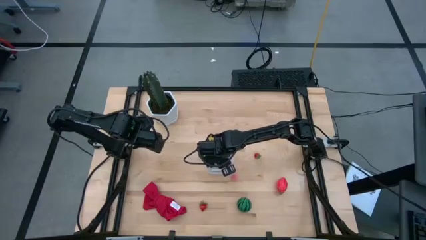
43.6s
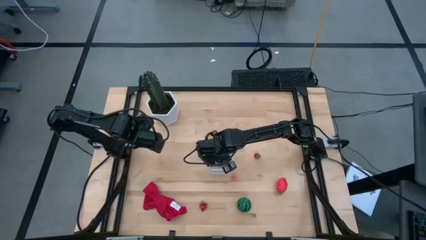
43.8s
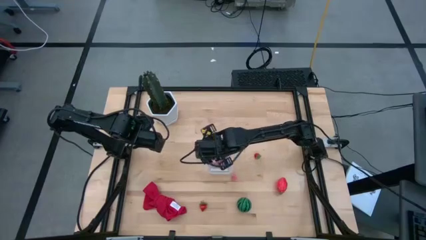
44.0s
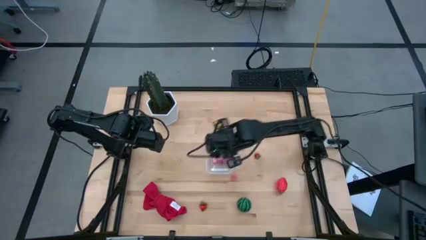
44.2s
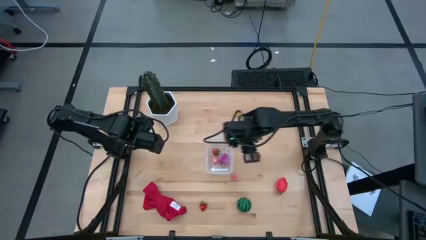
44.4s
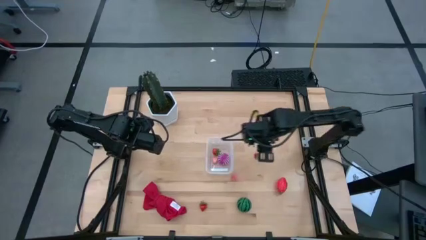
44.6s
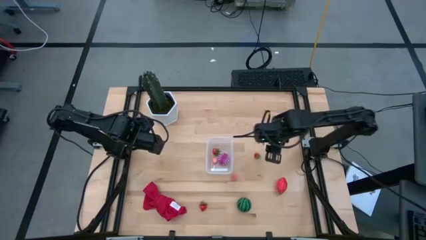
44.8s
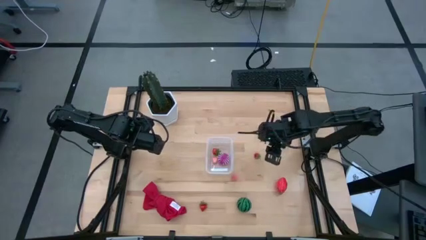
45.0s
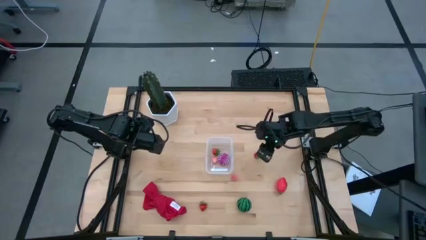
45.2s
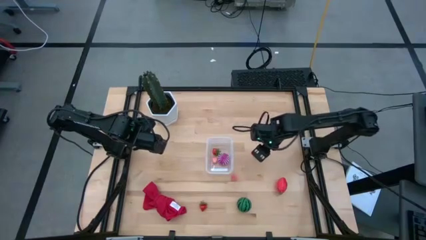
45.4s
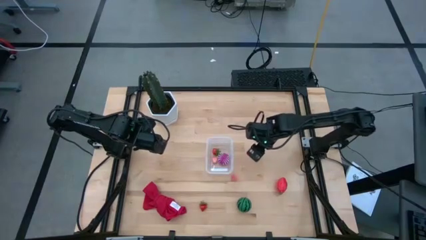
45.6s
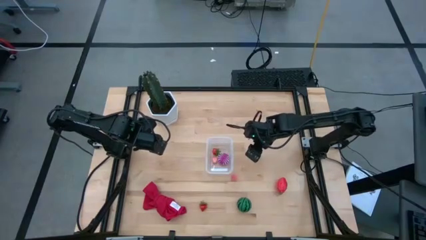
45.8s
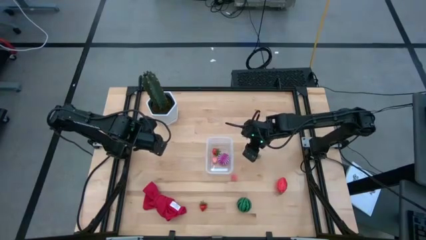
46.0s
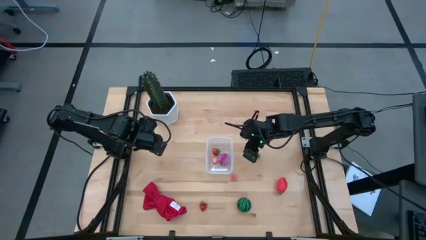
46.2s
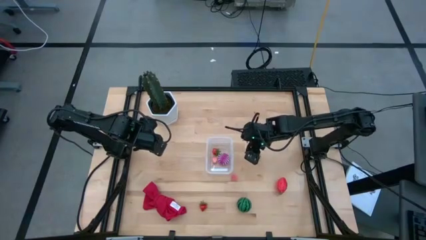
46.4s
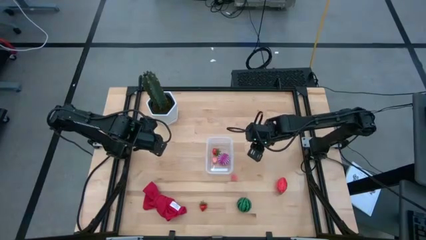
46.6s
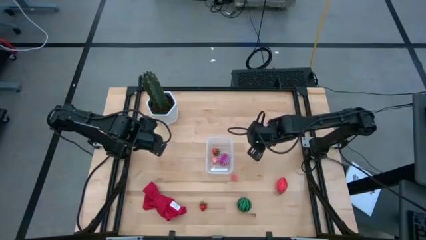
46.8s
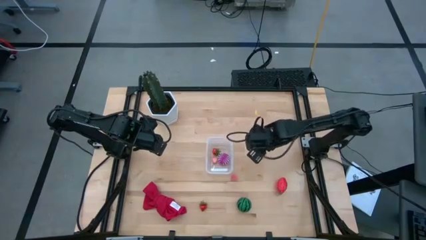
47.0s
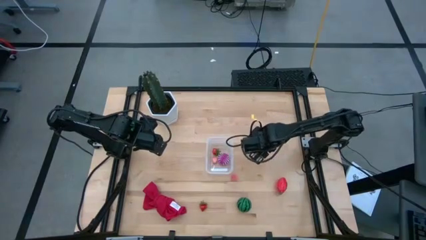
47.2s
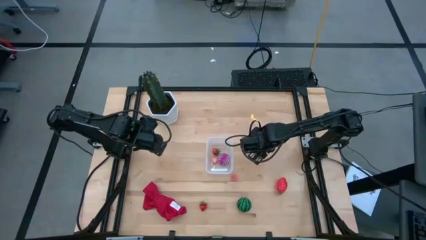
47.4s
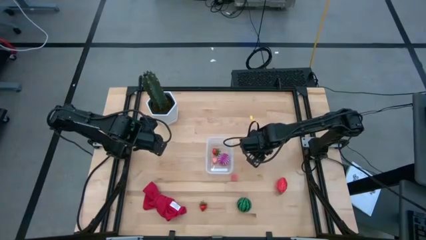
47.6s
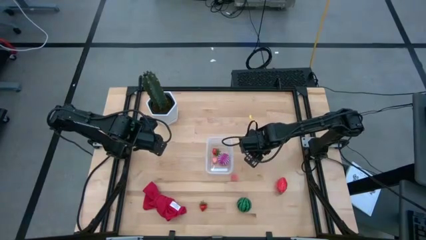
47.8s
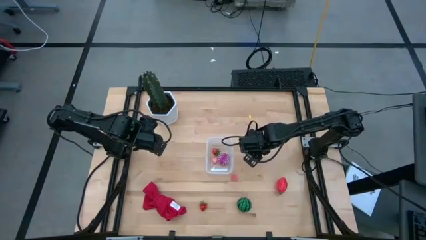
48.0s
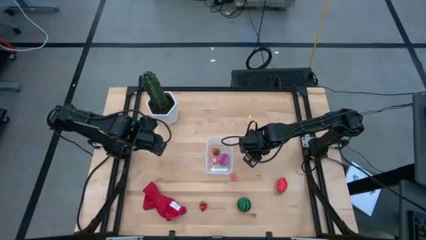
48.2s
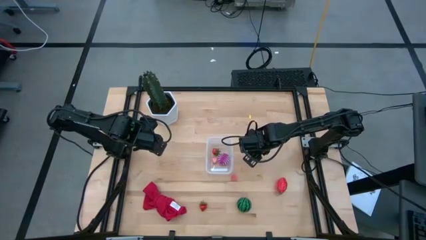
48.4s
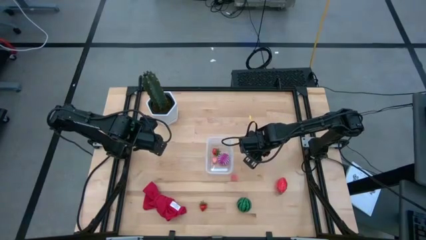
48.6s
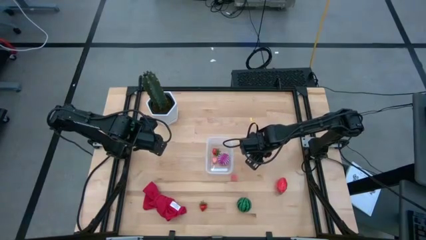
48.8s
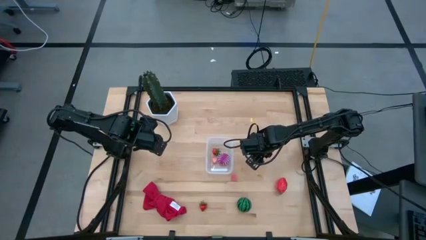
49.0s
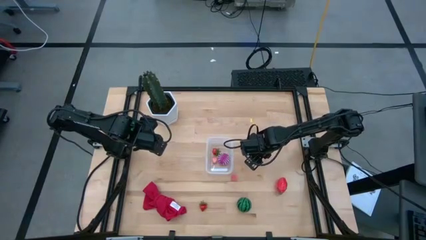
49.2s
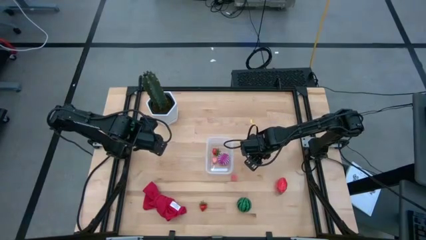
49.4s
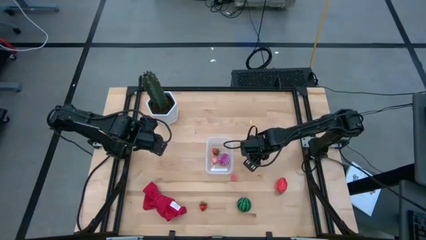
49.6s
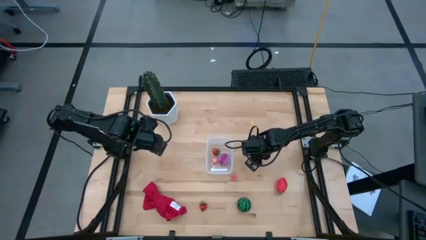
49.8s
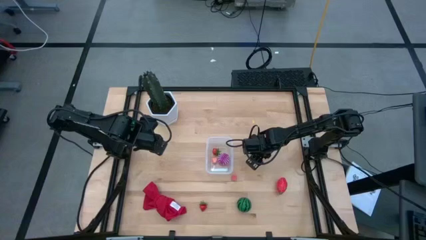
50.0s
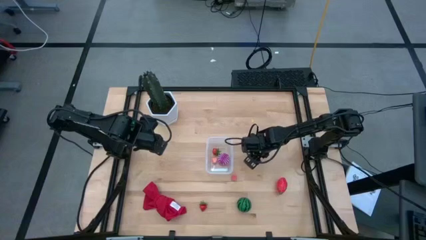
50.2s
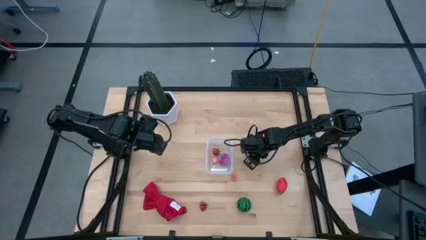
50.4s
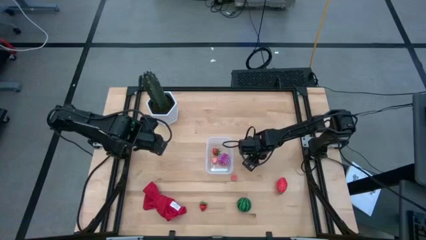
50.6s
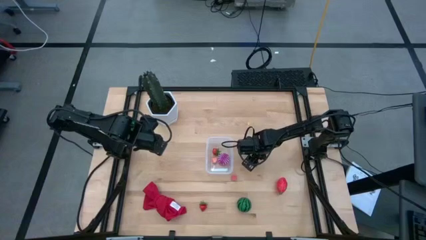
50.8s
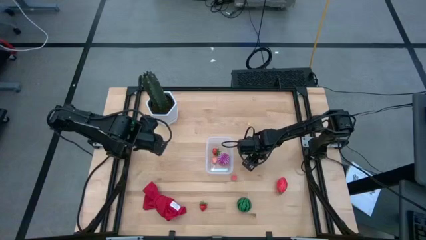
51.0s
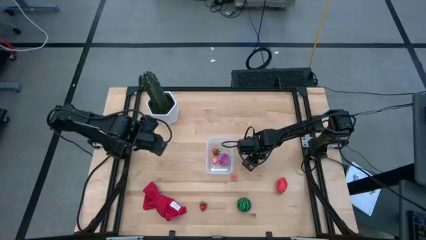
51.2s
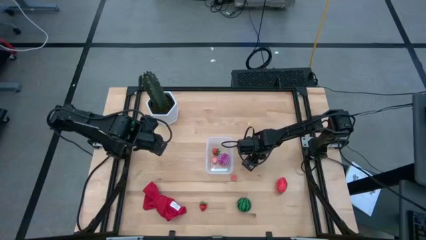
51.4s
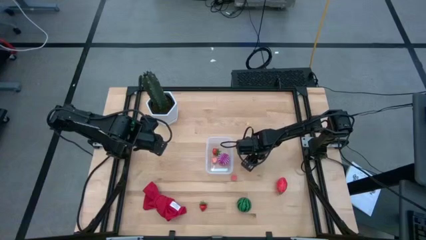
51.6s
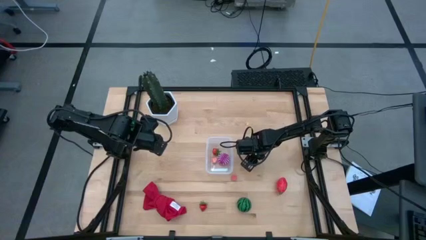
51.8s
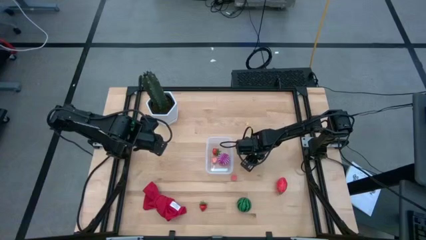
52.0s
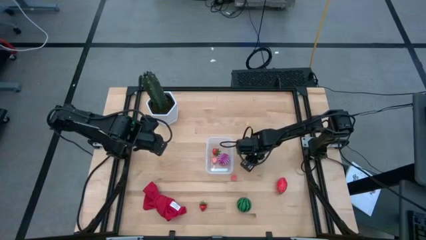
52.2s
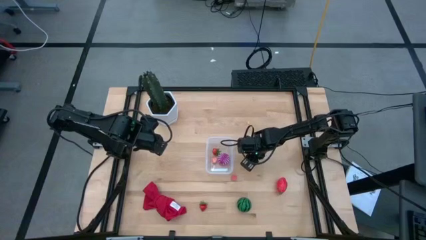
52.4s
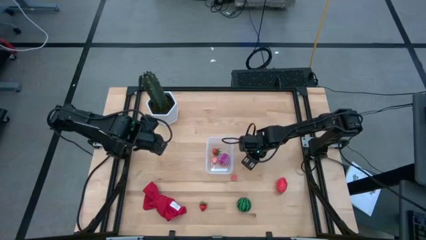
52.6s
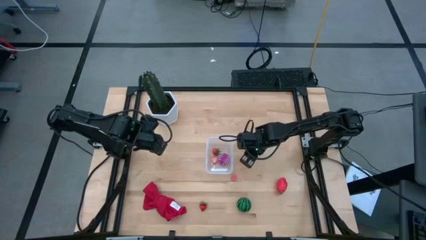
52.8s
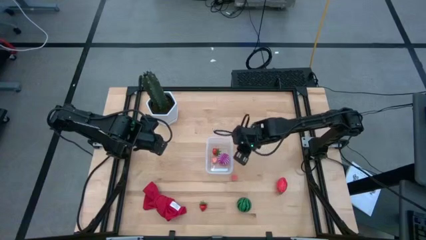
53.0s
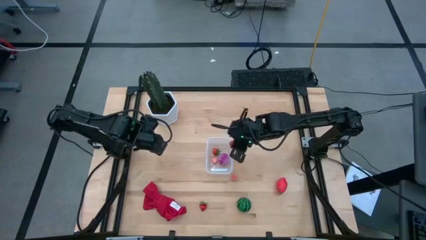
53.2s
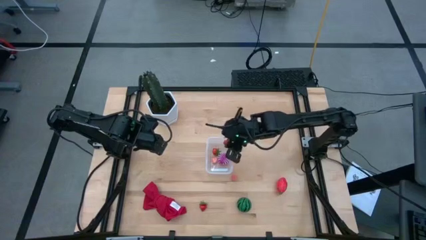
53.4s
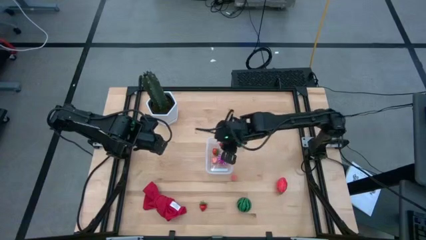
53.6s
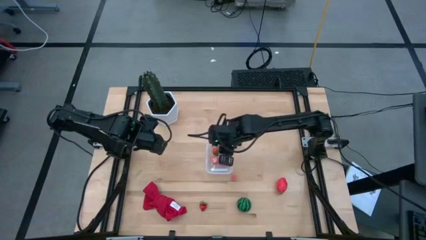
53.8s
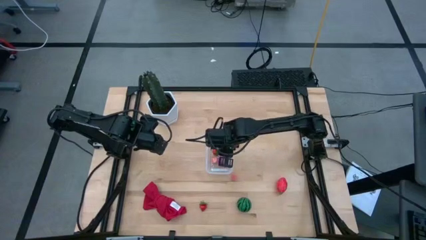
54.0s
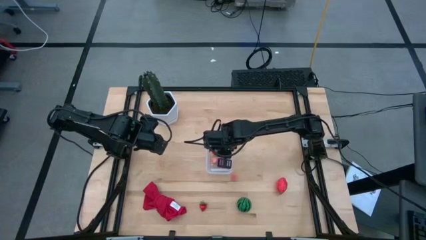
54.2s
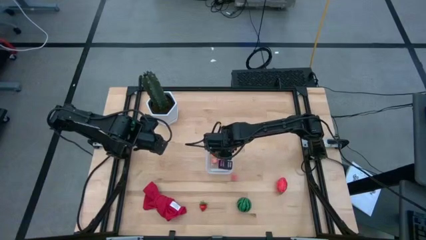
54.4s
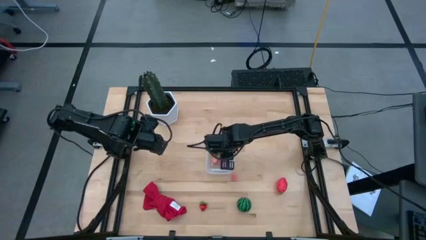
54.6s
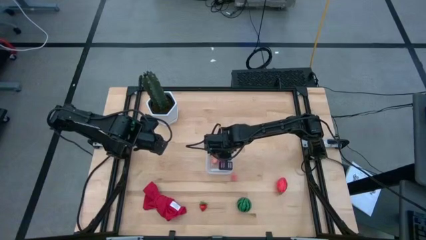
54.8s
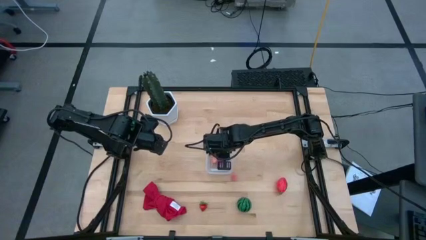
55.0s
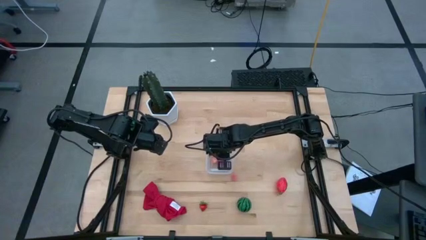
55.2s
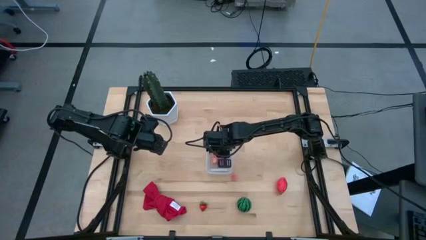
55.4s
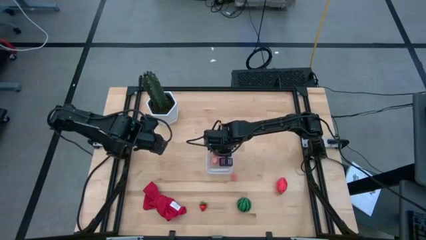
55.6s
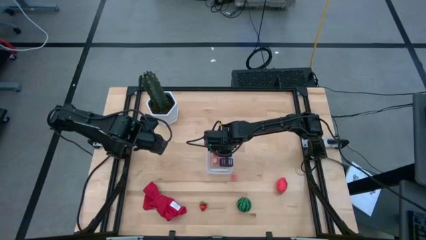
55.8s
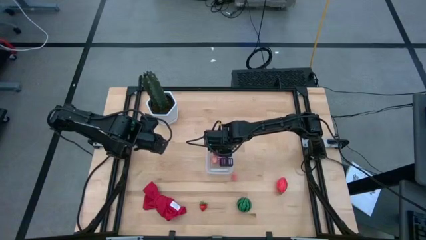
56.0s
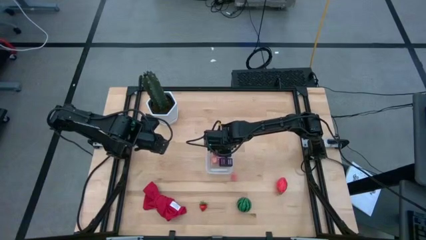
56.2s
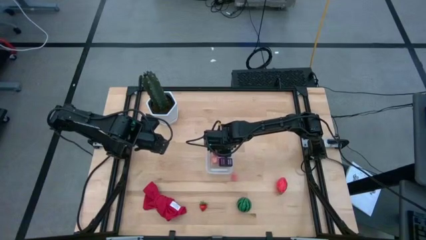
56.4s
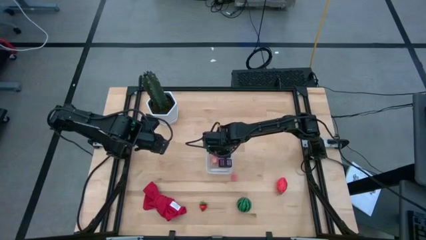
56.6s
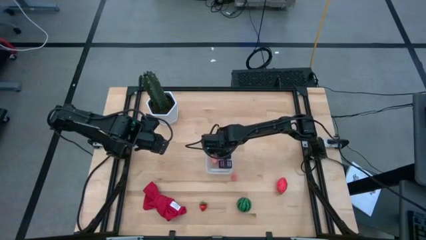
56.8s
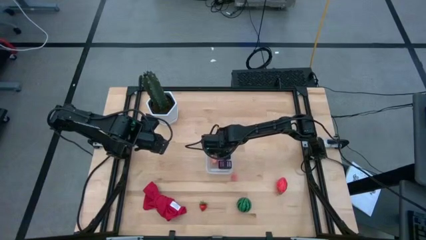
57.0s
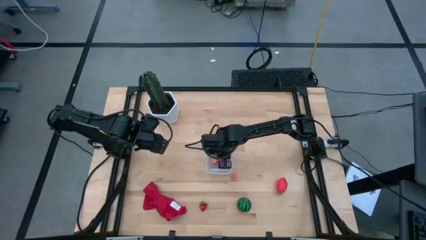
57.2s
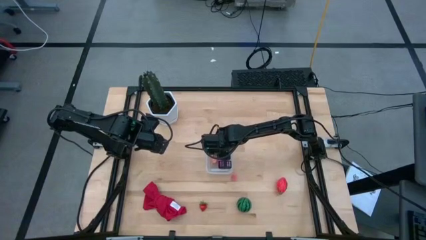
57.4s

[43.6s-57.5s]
Task: Pick and placing Produce into tupperware
Put the top red strawberry into the transparent bin

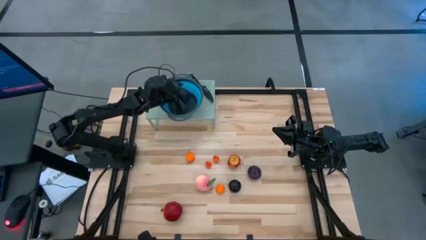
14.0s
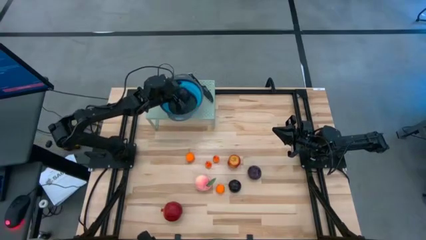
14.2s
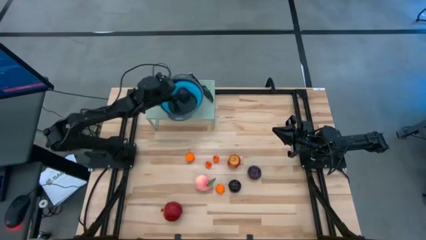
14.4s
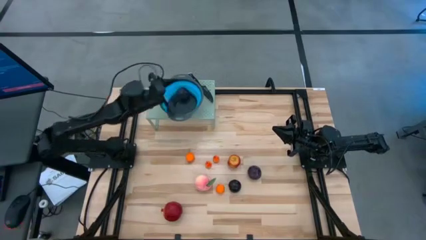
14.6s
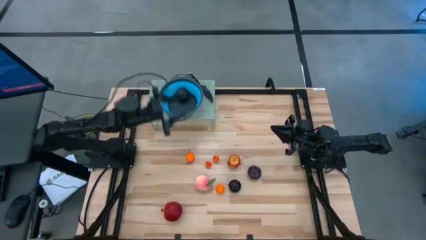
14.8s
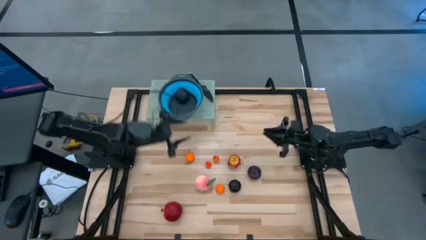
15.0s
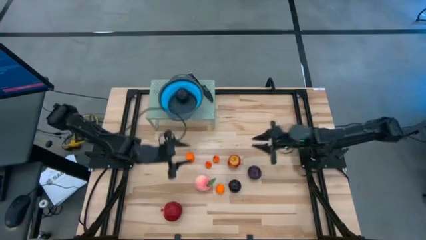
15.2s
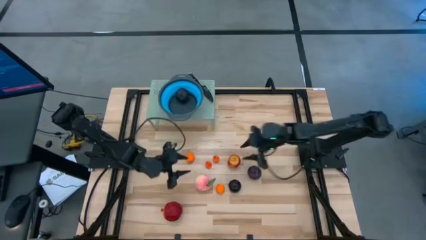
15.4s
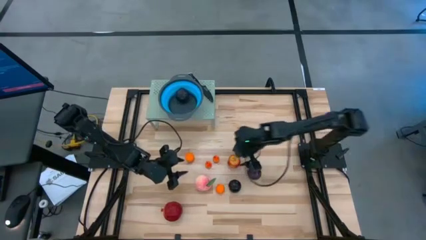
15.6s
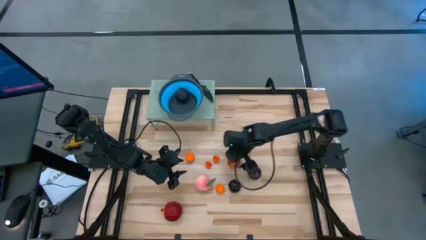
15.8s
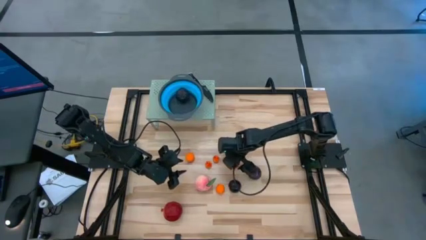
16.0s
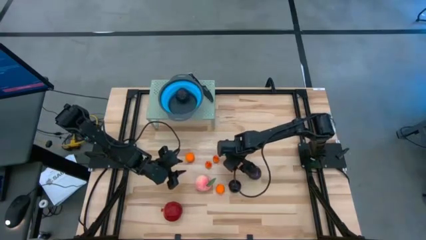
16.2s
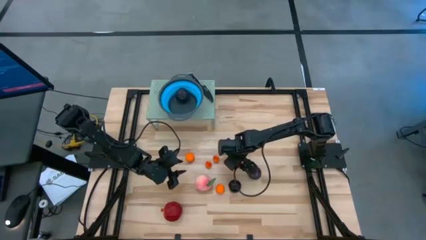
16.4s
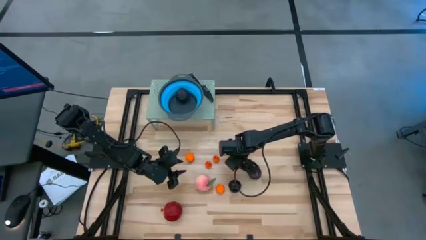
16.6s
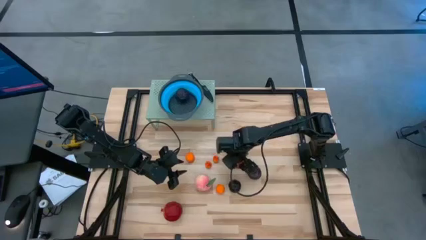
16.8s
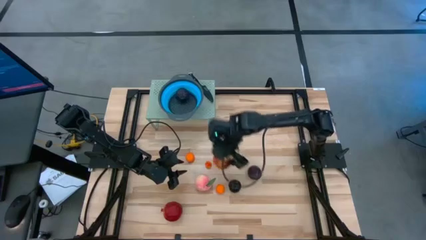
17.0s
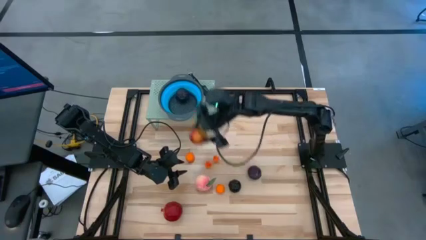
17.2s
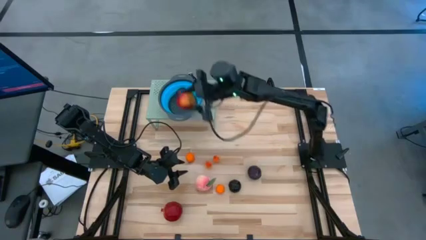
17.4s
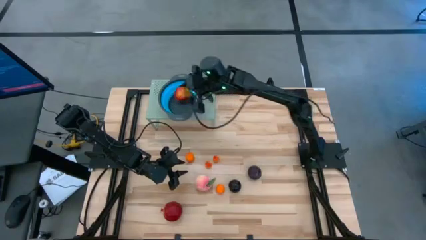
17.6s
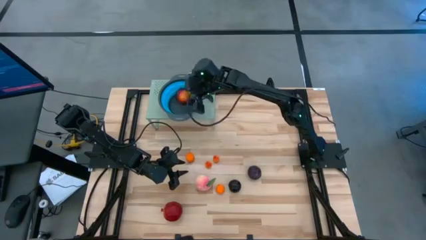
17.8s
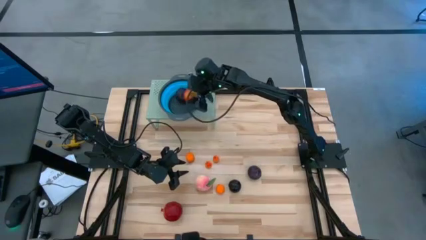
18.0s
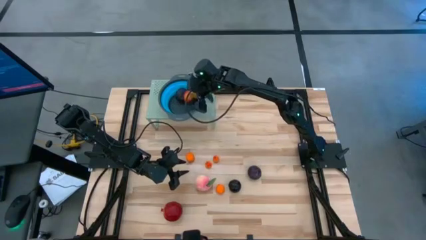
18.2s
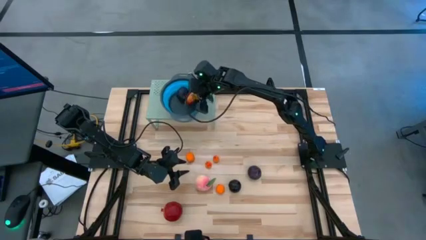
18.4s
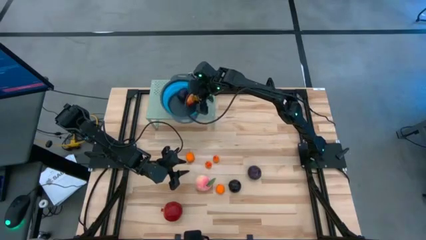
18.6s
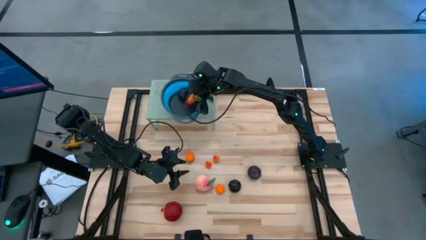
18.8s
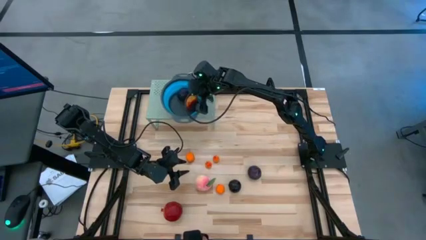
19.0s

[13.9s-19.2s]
Task: Pick & Place Fruit
Put the orange peach into the blue strainer bowl on the shelf
